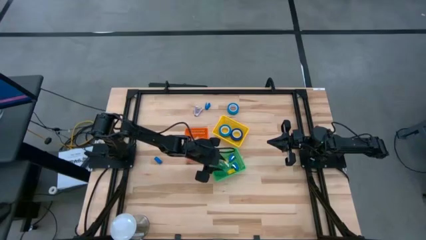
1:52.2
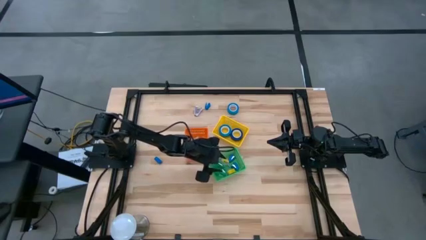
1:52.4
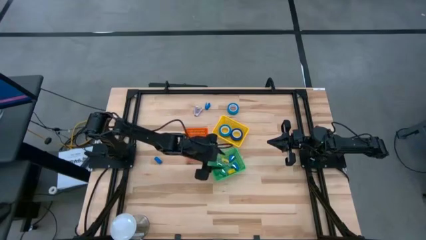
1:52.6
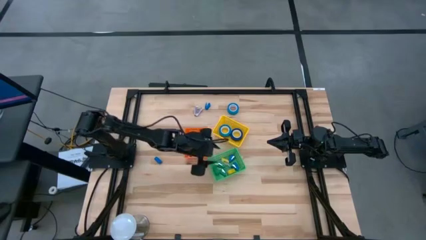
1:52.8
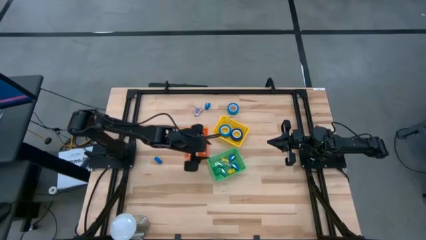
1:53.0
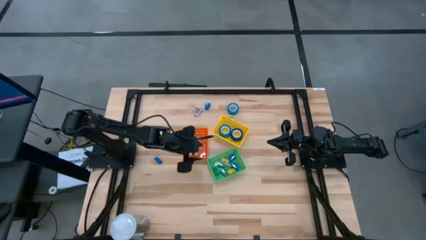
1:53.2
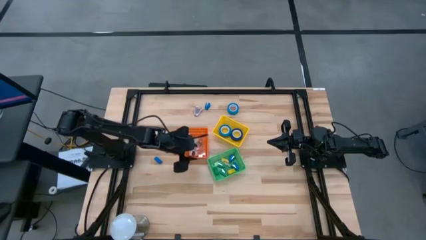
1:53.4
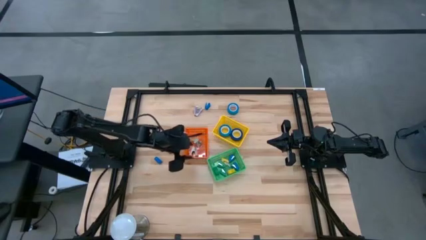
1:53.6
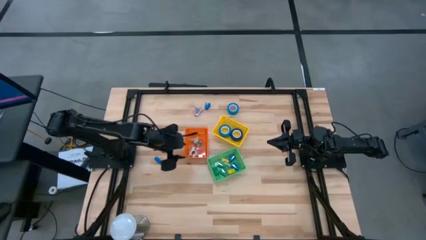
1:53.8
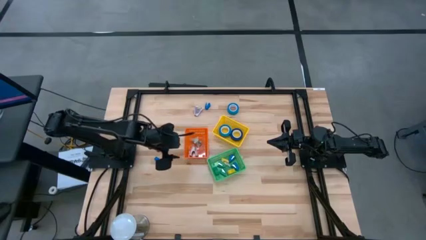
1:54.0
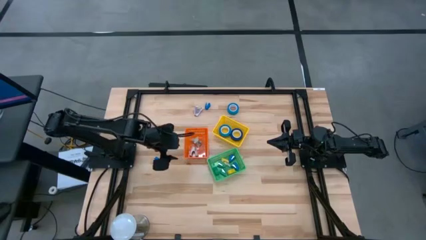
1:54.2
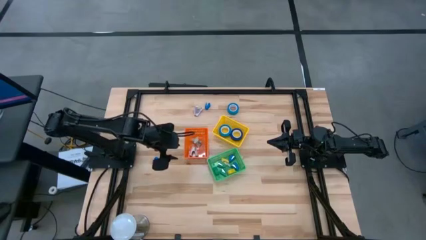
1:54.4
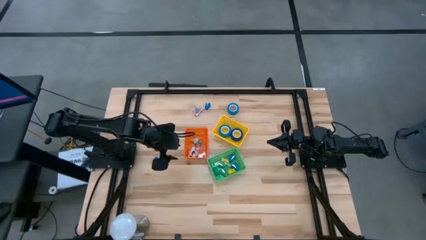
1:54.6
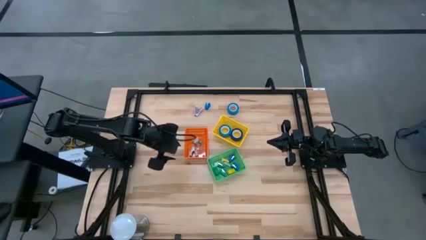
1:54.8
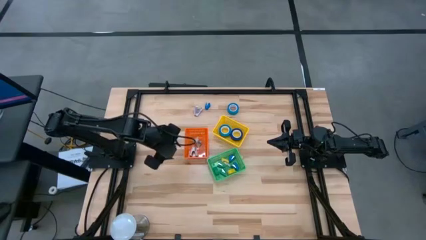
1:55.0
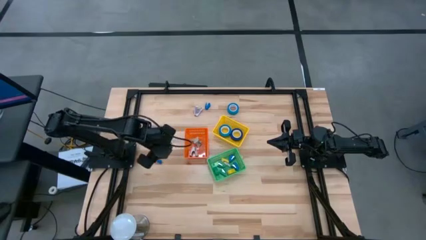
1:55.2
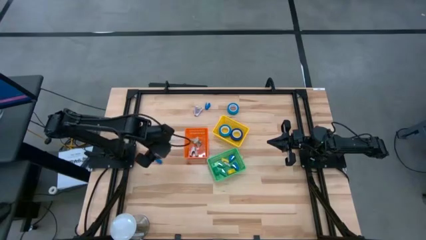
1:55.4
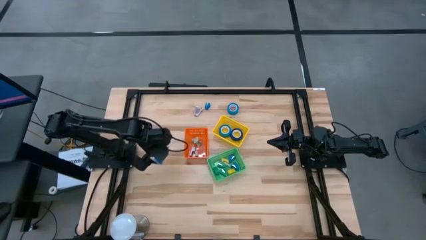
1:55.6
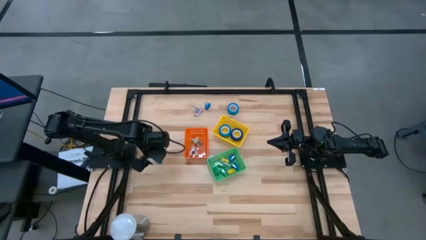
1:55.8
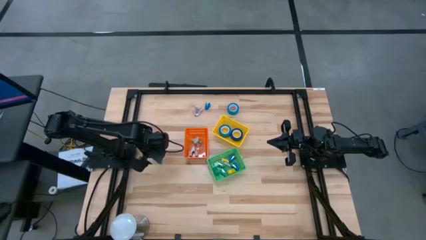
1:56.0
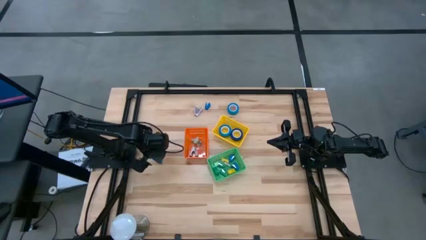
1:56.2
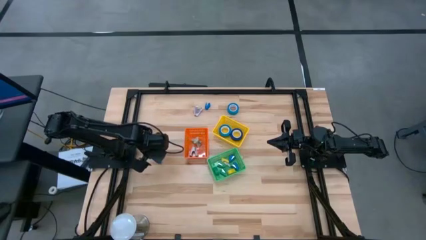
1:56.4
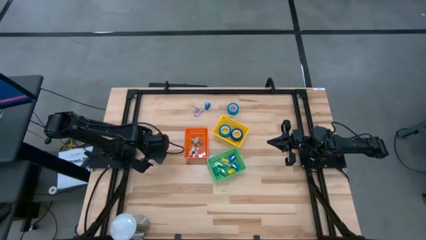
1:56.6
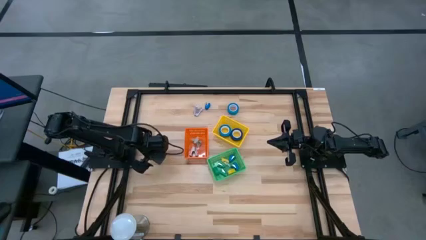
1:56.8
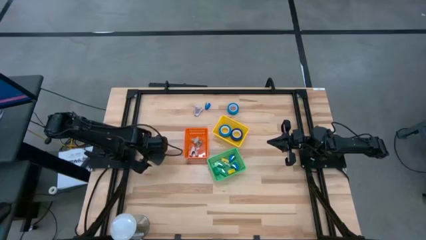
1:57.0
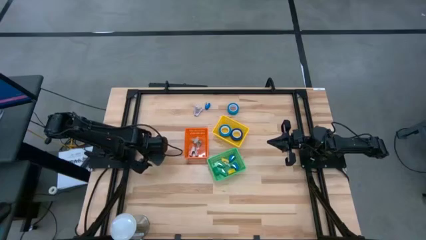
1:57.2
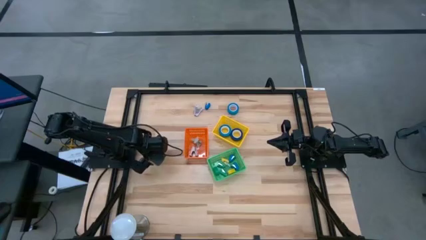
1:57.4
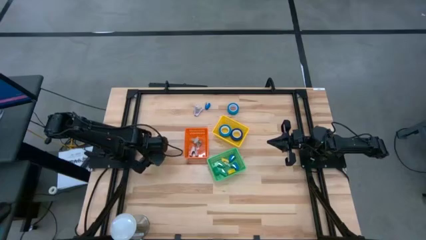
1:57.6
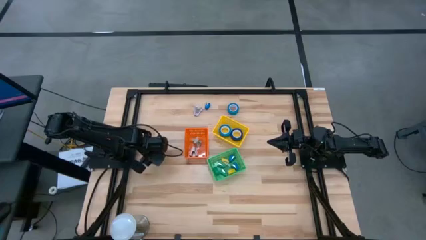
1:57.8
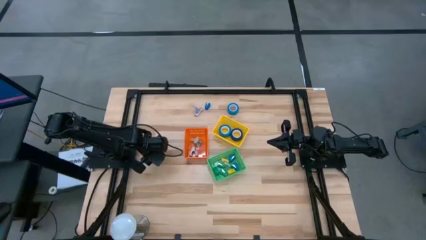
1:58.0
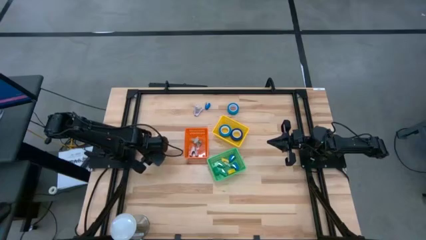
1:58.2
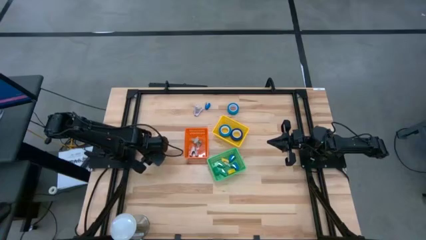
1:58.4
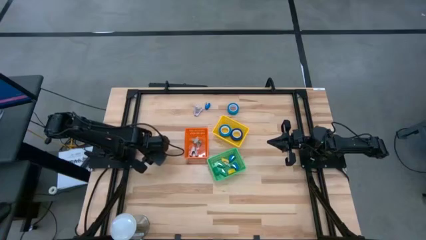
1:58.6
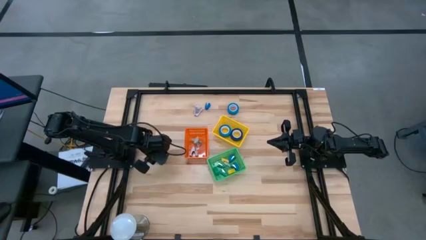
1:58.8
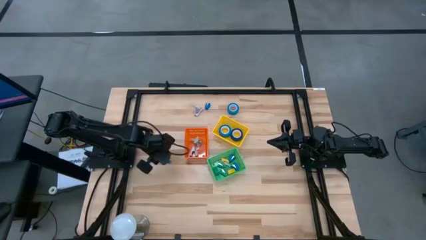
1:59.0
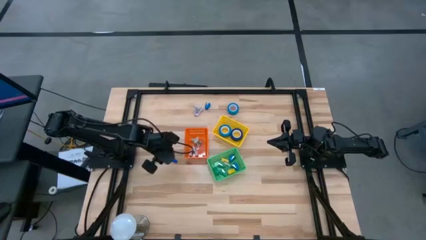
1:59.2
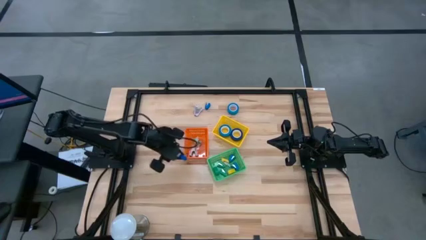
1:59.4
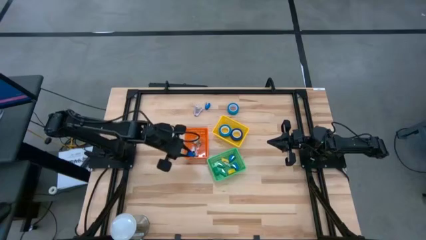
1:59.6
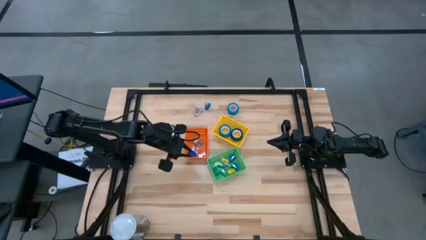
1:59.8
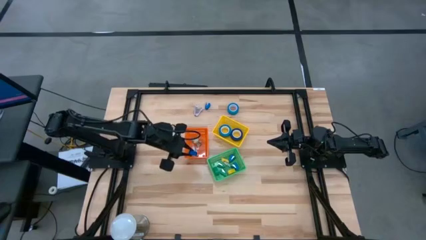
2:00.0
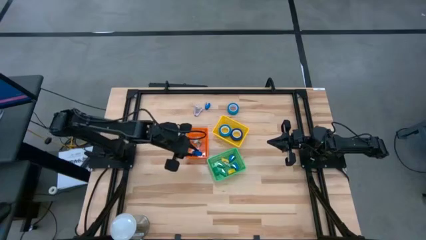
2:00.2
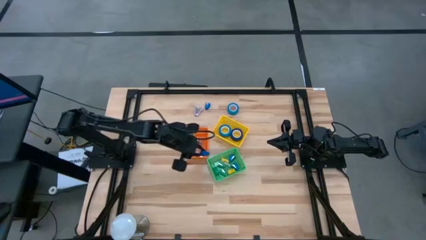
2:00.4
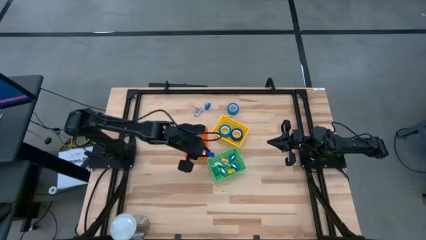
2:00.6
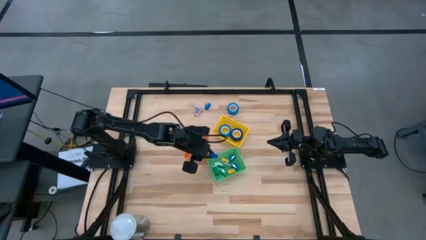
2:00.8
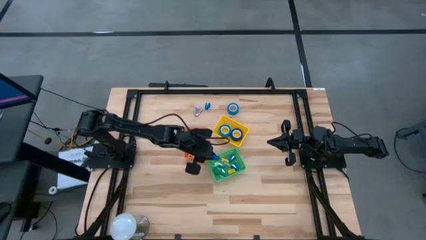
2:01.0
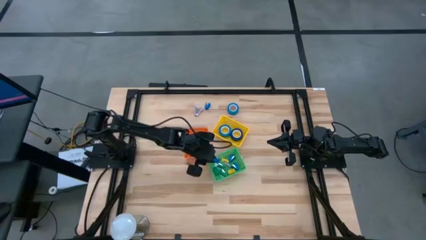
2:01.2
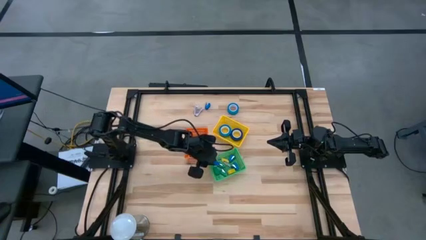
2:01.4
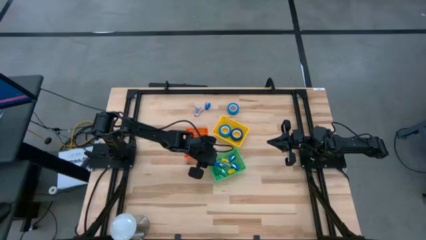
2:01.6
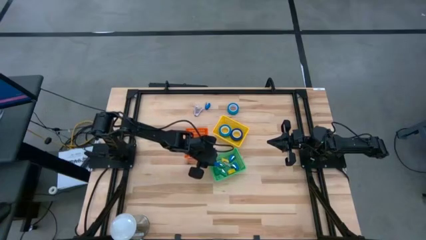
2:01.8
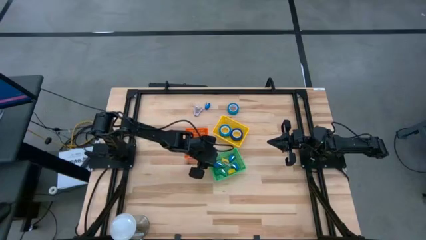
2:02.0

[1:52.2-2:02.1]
Task: Pick and place Stapler, Stapler remover, tape
Put the blue stapler into the green bin

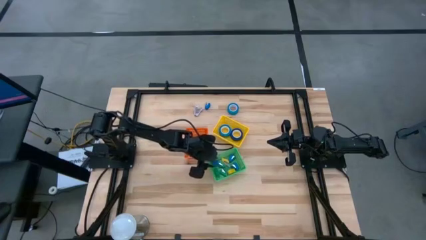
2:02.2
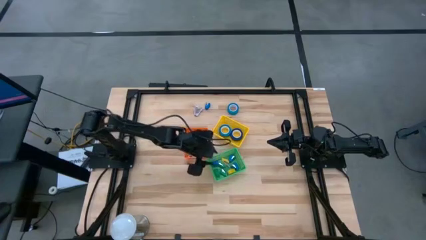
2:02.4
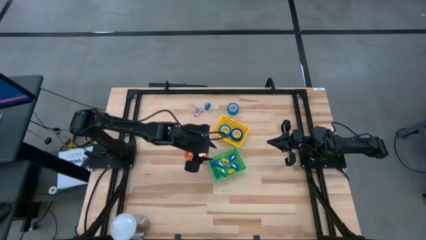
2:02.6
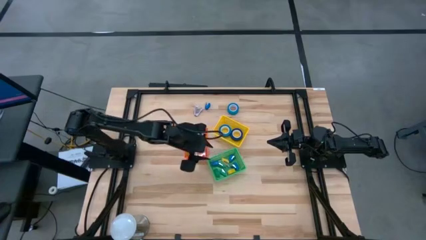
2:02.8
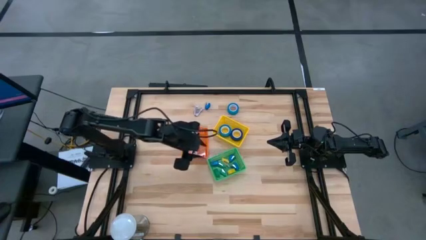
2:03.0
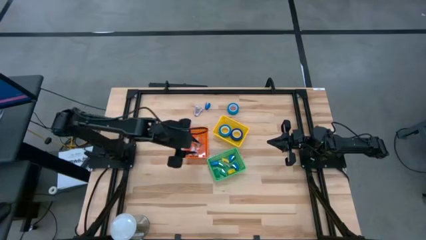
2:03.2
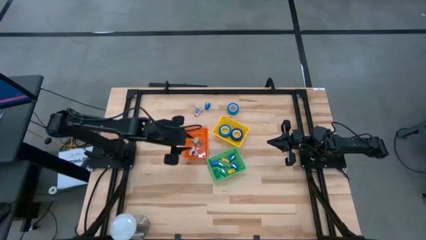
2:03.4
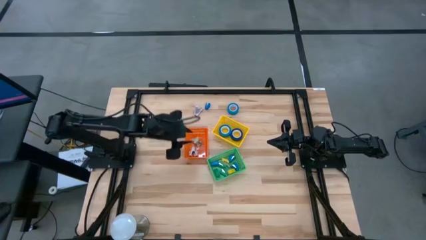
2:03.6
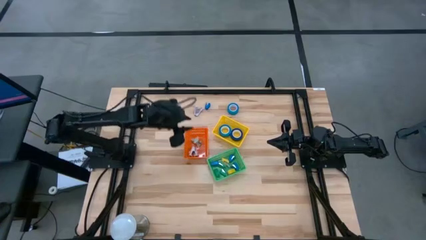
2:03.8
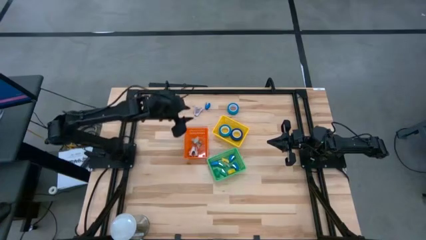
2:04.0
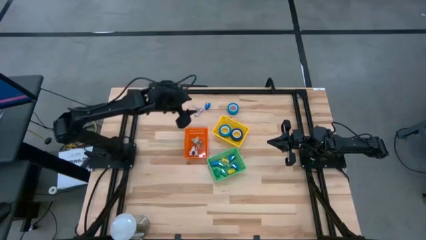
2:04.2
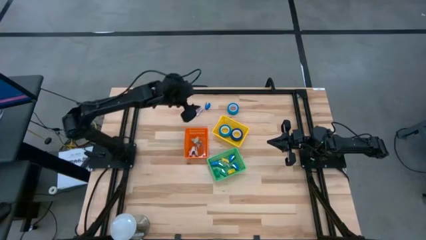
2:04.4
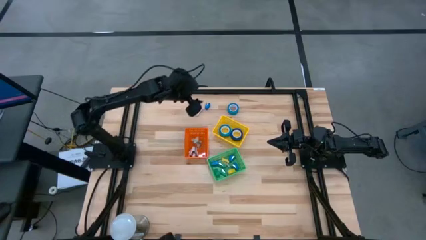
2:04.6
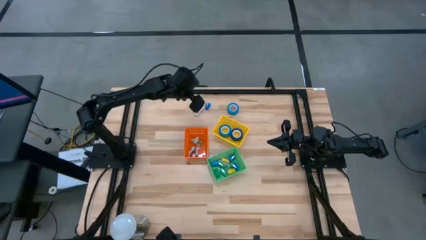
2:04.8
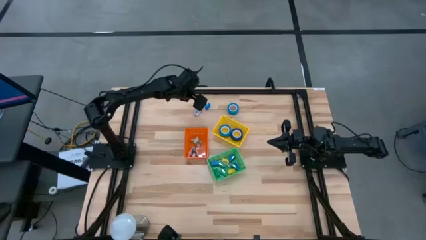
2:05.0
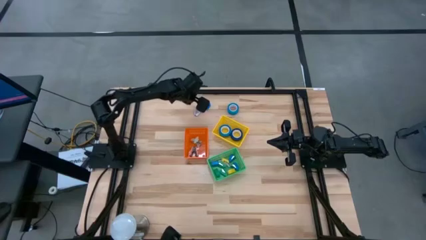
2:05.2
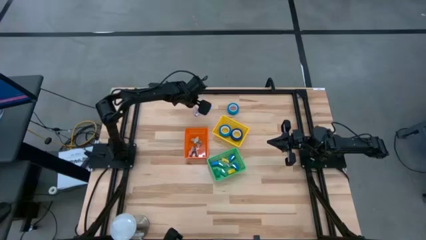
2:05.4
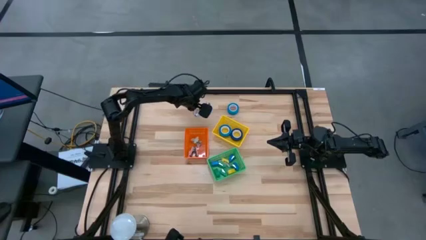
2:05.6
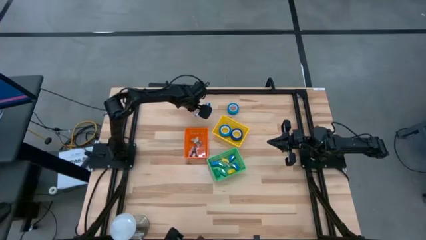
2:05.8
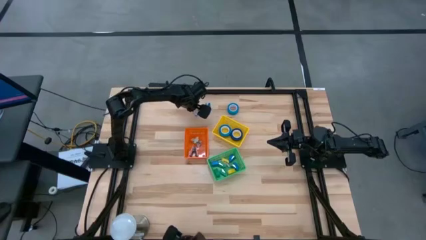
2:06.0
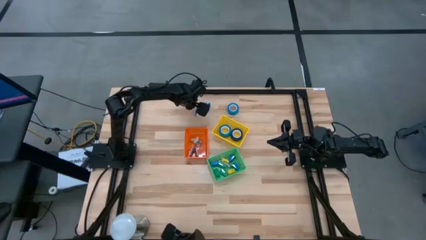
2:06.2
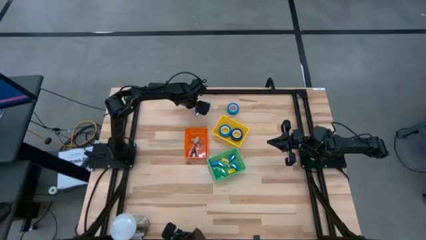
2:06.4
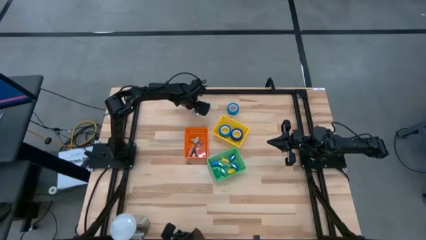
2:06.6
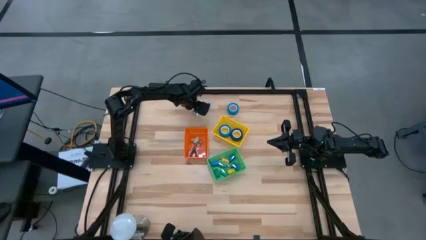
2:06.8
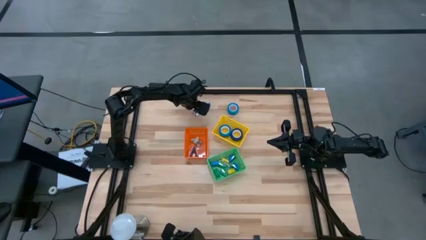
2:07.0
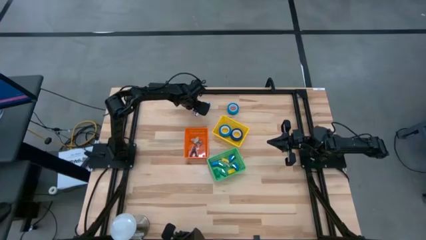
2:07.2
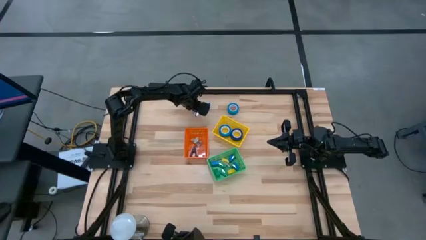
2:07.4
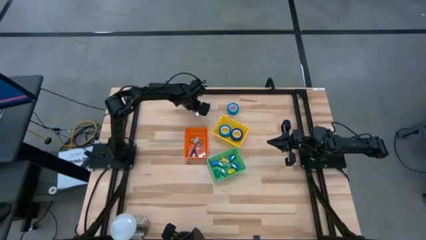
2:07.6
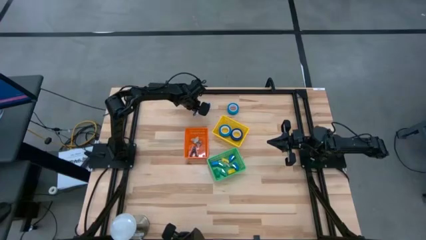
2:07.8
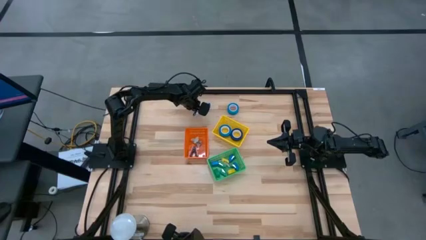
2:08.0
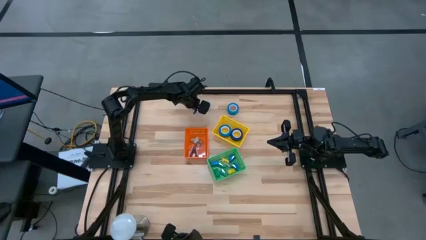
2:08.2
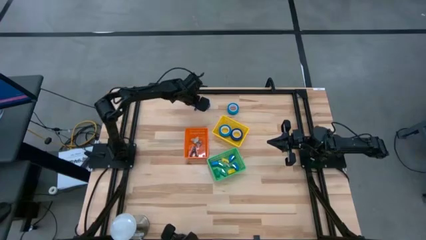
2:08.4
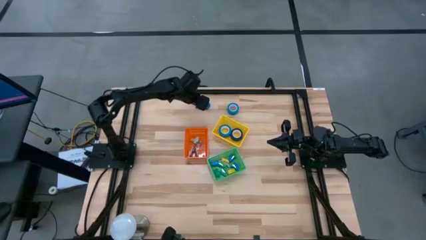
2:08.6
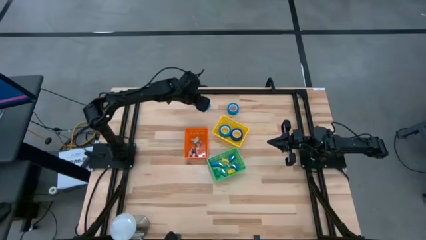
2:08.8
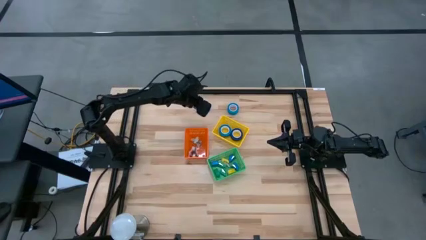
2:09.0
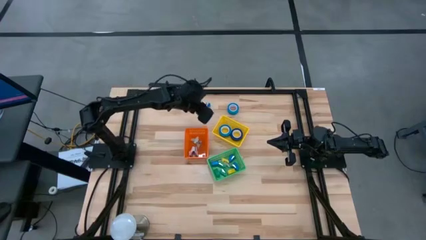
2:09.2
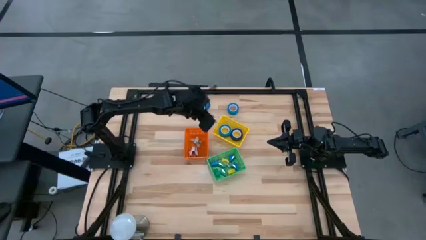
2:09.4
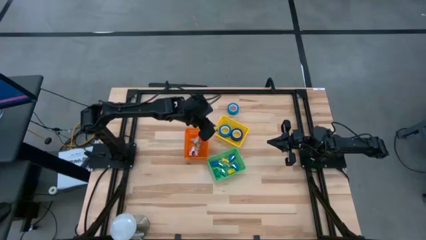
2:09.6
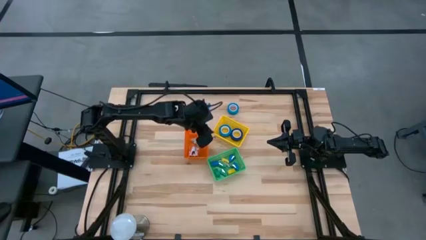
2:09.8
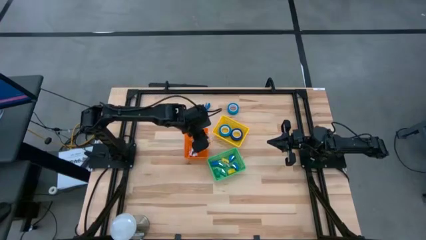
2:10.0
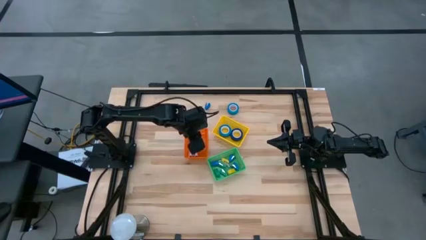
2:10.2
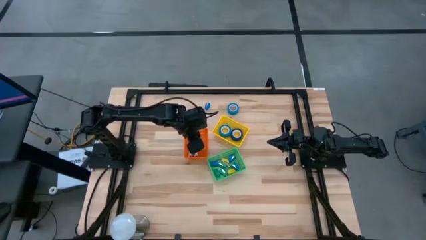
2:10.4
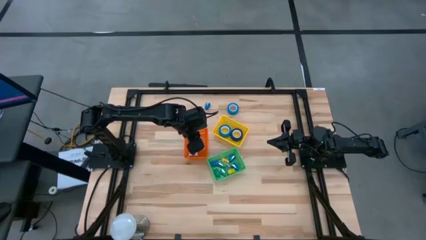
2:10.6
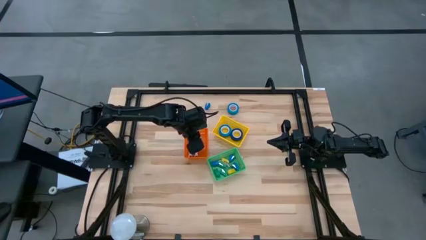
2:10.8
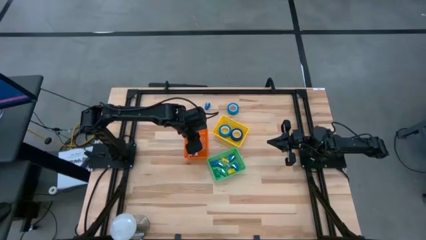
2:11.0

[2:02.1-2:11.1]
Put the purple stapler remover into the orange bin
